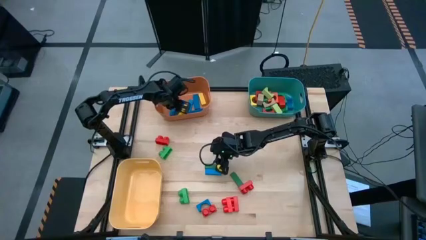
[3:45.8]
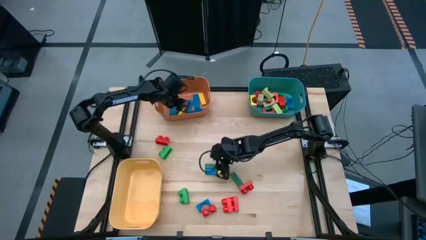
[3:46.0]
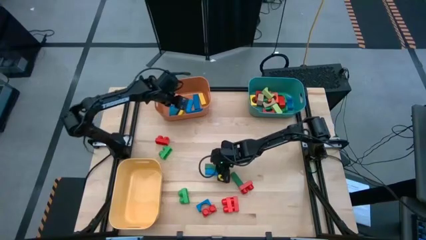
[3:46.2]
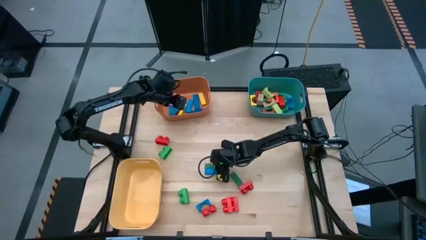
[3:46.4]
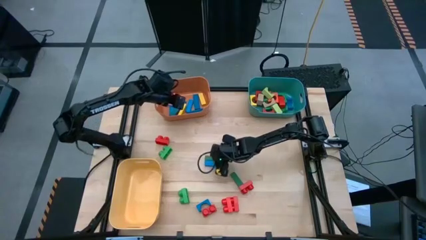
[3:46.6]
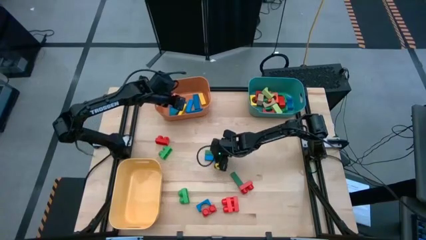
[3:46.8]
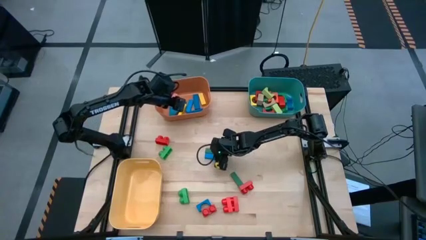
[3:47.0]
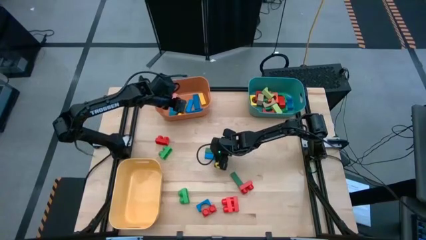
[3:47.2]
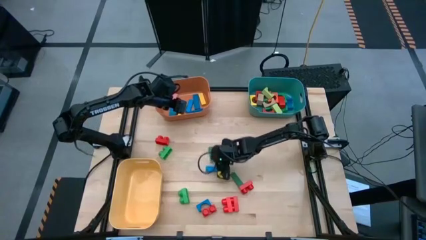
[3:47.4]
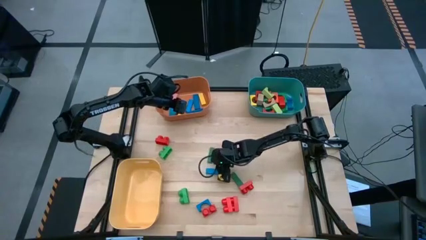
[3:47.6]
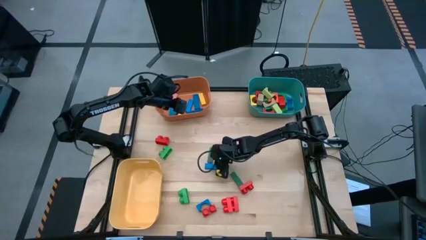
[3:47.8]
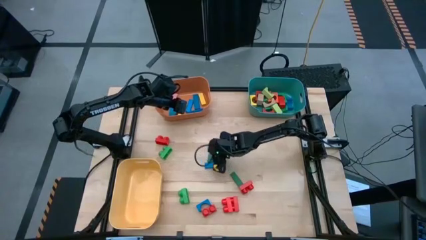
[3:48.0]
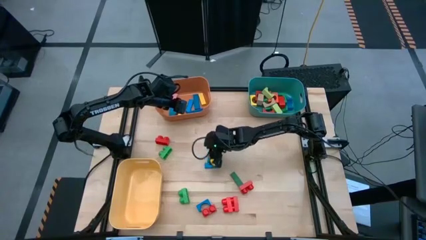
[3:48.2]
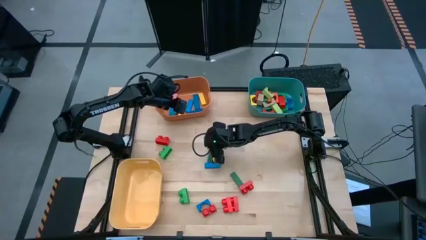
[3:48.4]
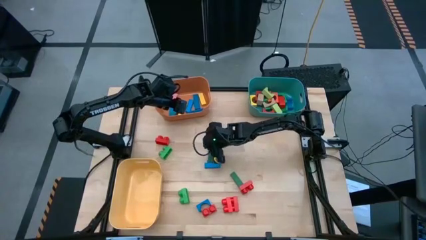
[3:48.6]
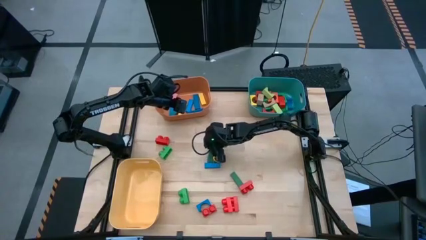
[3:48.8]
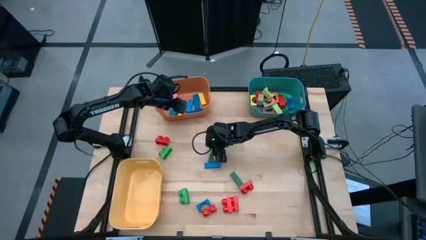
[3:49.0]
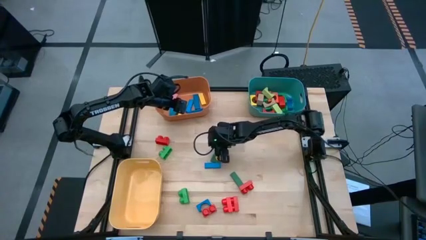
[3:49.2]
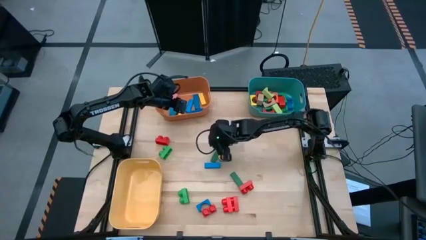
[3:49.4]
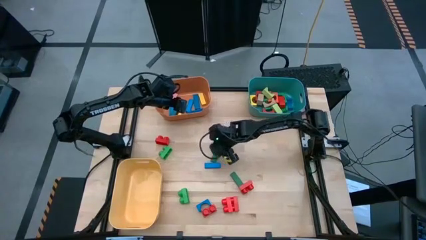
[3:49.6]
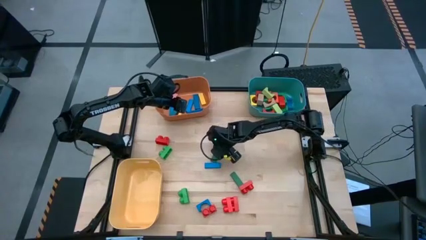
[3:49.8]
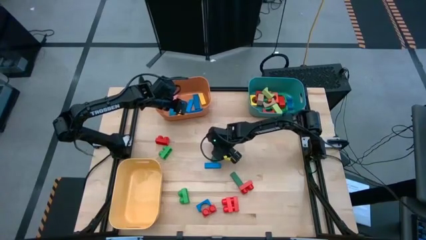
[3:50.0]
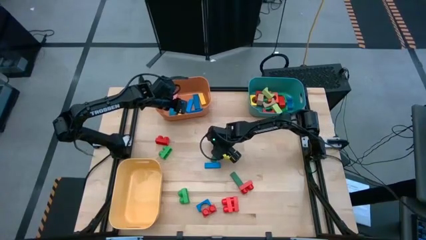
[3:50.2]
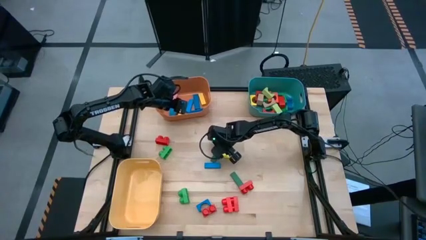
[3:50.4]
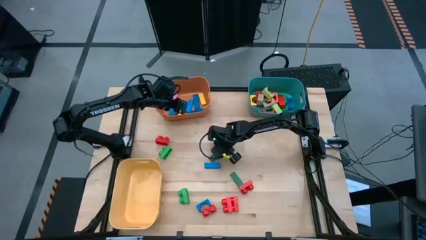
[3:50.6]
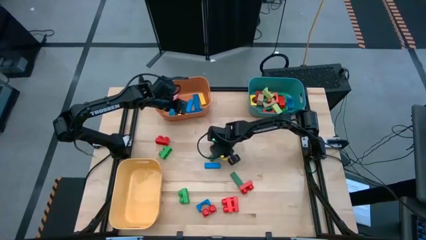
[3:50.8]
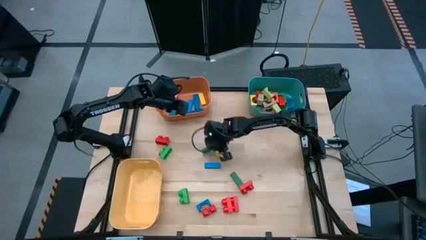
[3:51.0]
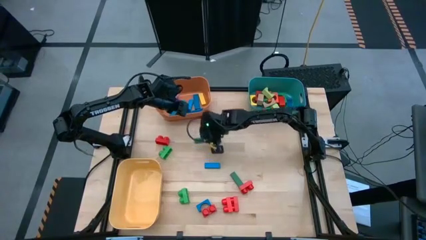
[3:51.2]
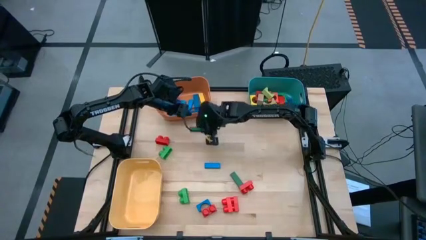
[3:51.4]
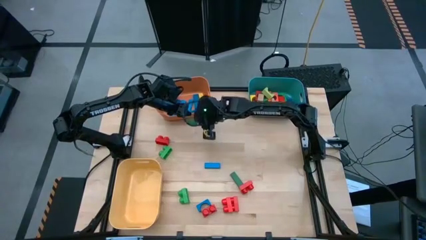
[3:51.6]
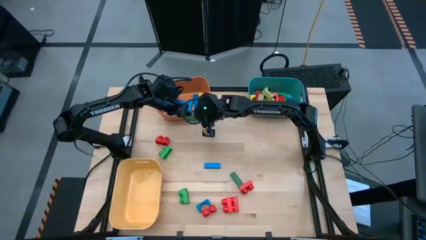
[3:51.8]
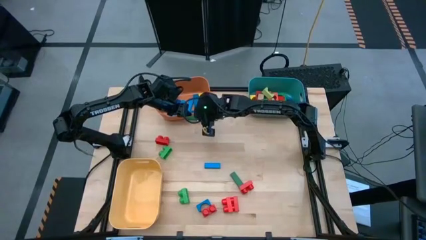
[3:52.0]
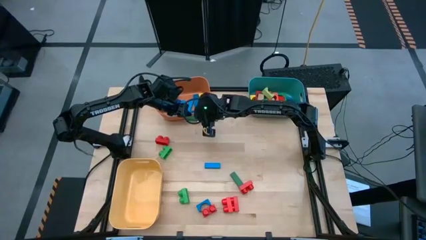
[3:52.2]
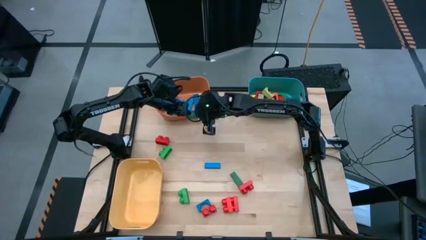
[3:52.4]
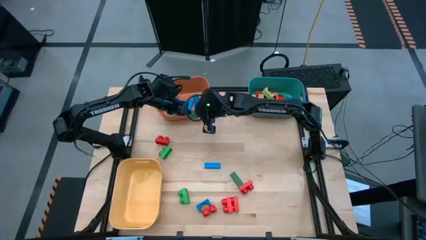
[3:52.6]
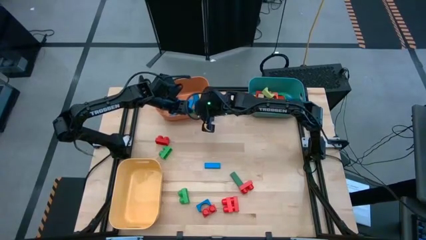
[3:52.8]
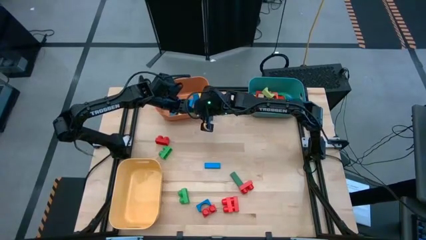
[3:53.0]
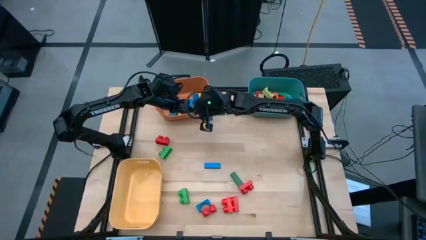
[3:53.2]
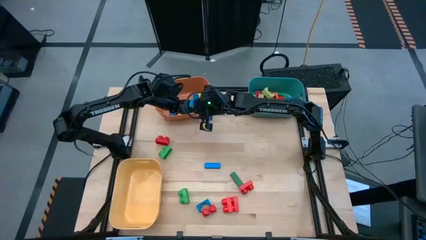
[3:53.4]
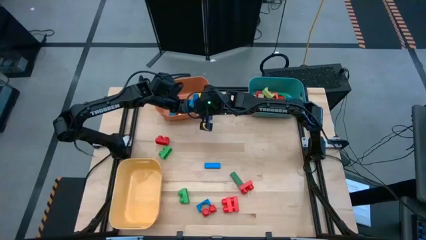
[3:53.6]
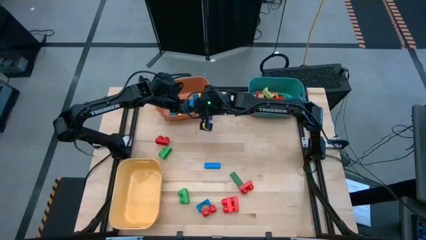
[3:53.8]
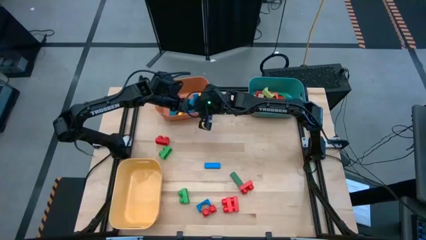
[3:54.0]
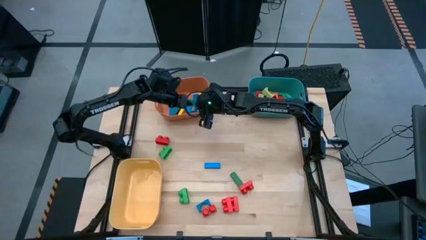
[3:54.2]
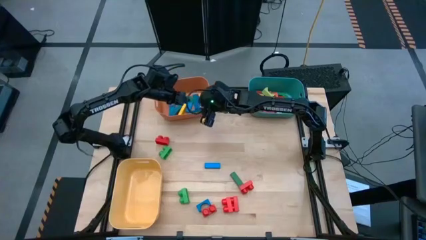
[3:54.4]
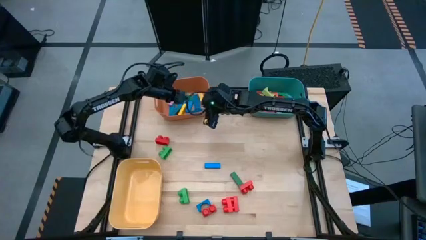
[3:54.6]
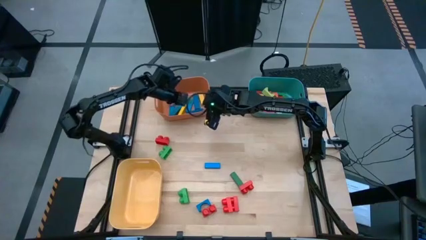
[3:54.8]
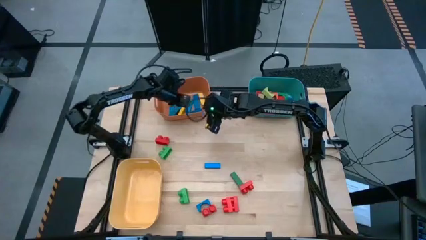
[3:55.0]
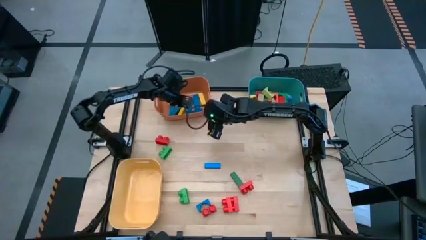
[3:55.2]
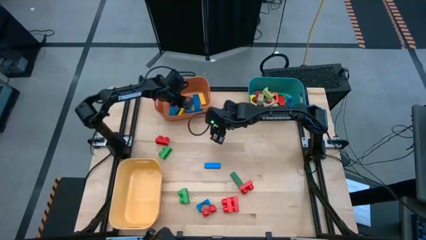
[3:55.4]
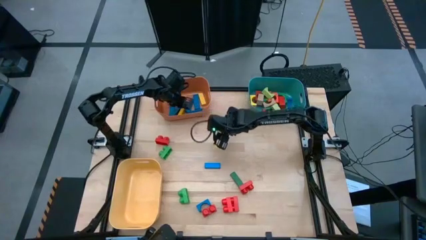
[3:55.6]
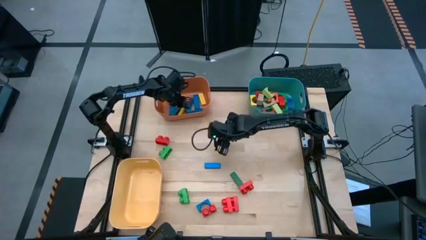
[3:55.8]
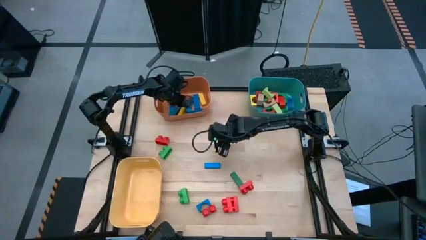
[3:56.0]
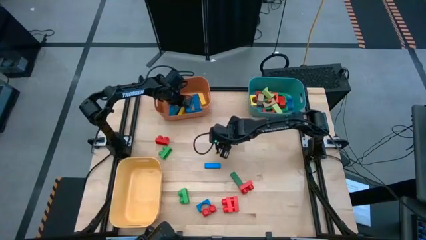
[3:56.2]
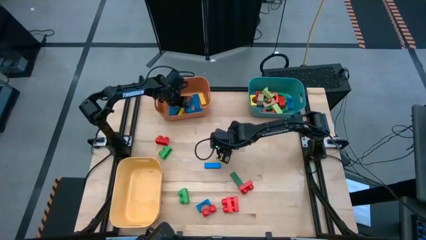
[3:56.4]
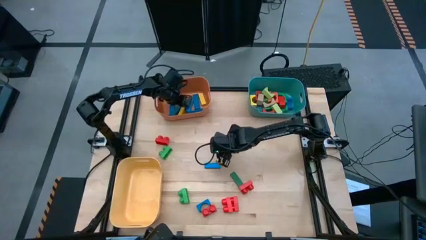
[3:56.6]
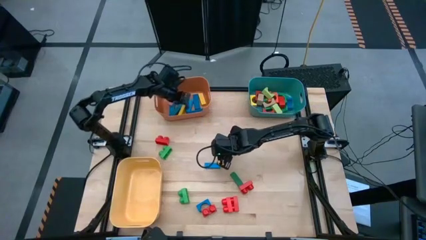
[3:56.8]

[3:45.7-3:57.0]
Task: Sort blocks by size
Put the green rectangular block into the orange bin

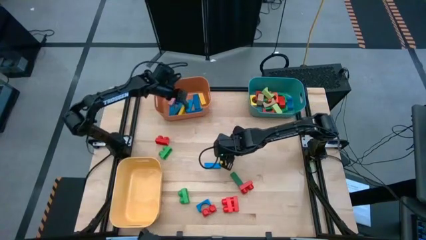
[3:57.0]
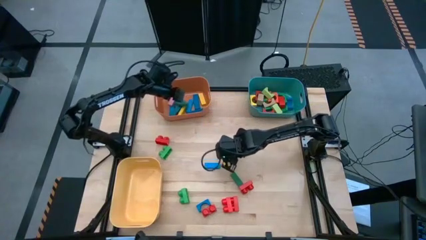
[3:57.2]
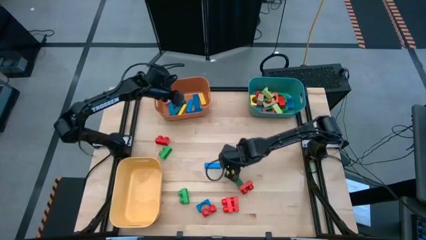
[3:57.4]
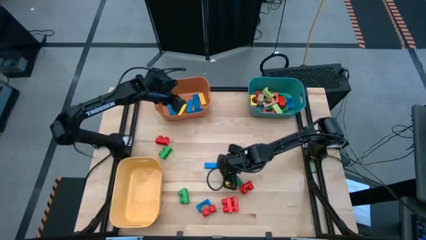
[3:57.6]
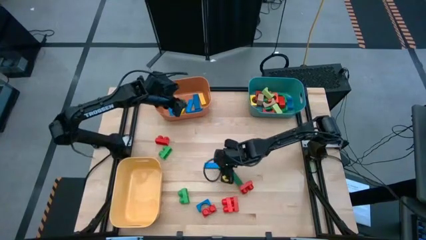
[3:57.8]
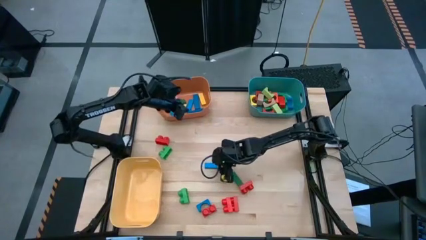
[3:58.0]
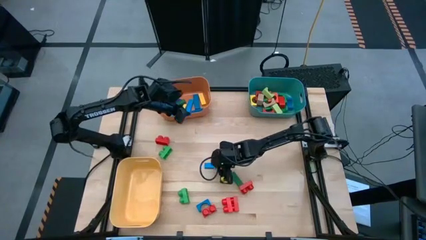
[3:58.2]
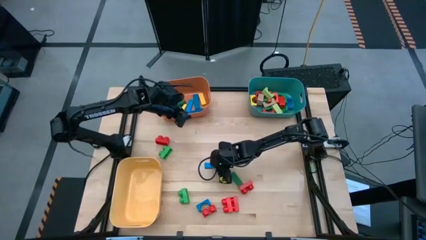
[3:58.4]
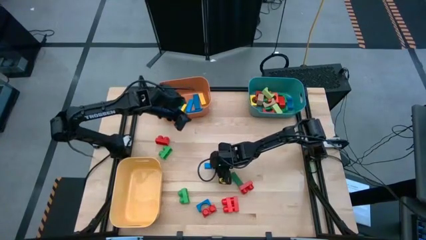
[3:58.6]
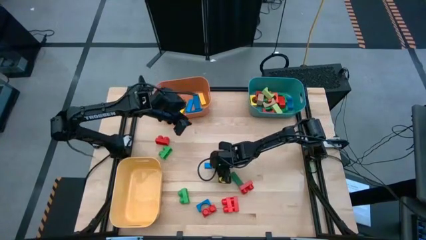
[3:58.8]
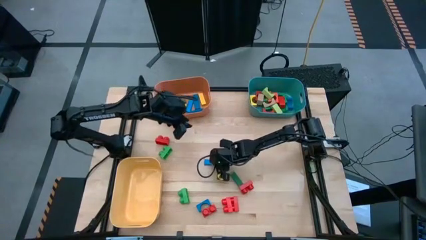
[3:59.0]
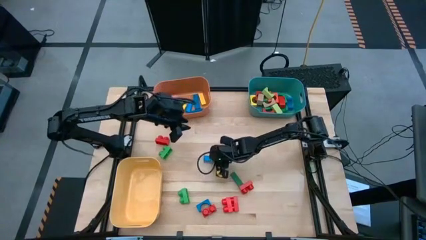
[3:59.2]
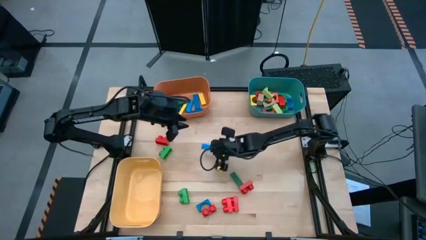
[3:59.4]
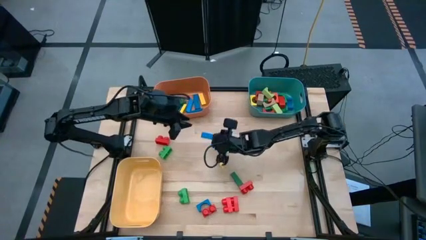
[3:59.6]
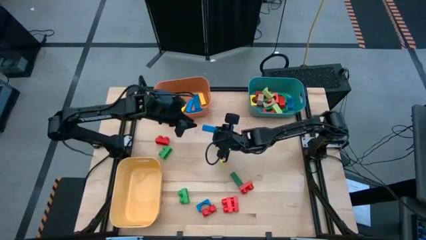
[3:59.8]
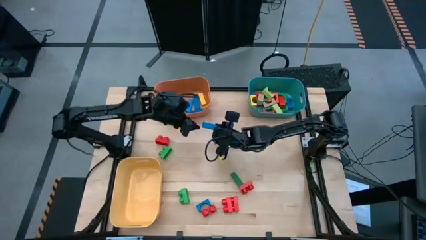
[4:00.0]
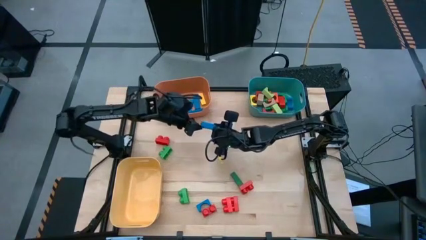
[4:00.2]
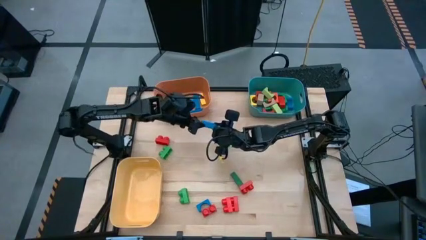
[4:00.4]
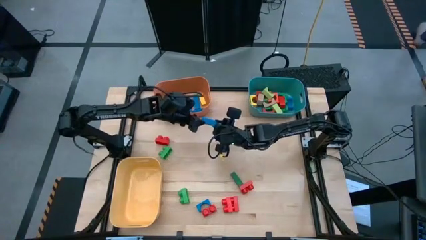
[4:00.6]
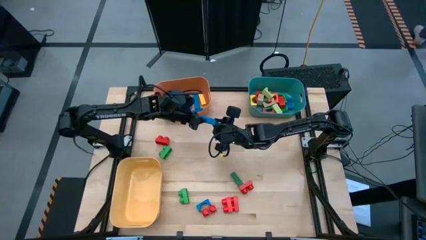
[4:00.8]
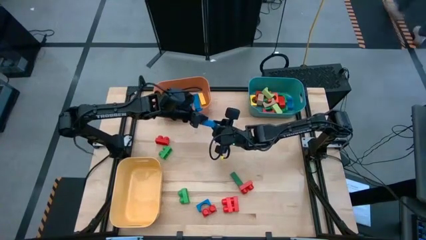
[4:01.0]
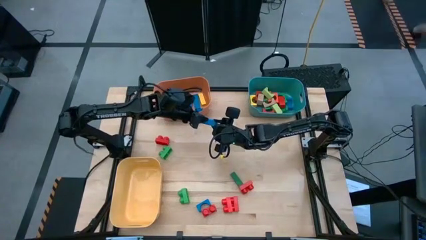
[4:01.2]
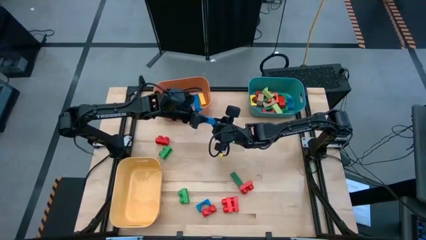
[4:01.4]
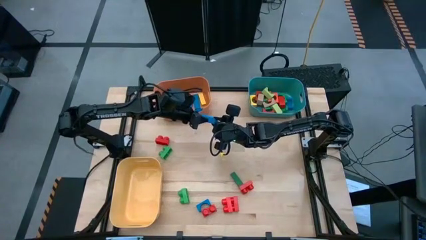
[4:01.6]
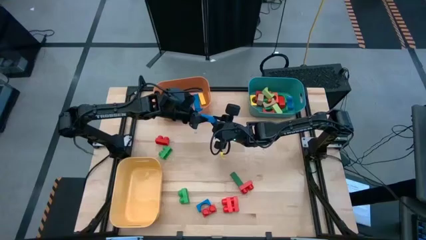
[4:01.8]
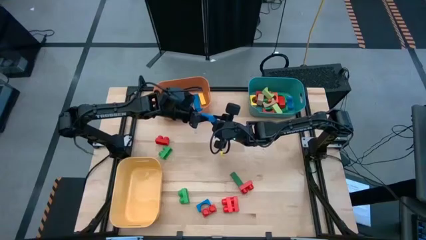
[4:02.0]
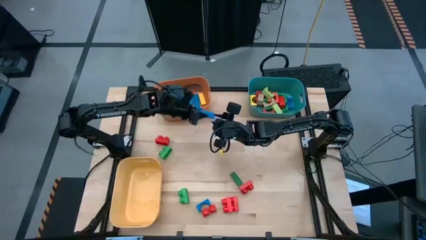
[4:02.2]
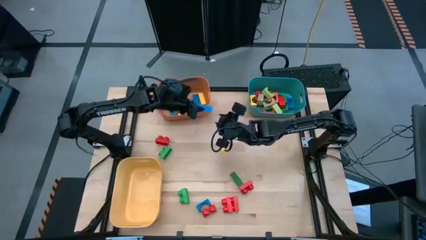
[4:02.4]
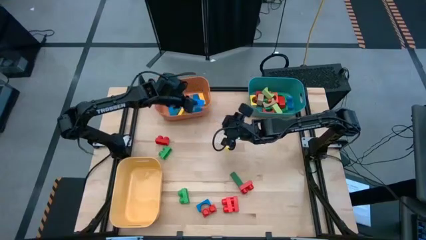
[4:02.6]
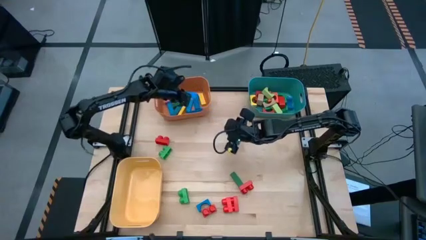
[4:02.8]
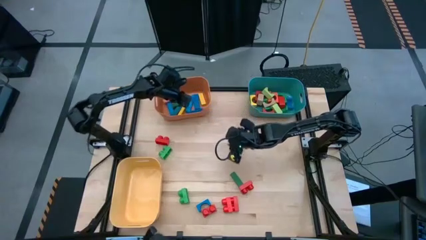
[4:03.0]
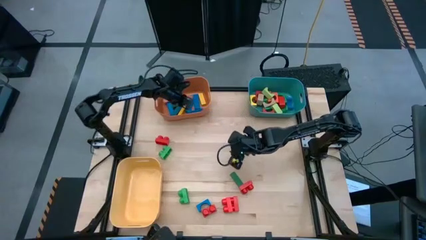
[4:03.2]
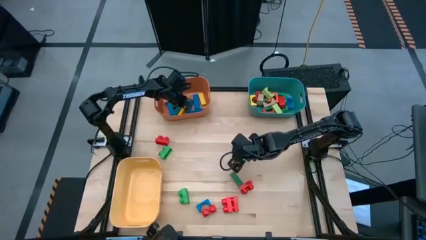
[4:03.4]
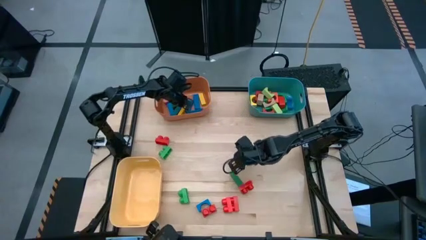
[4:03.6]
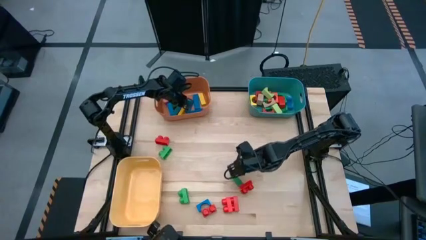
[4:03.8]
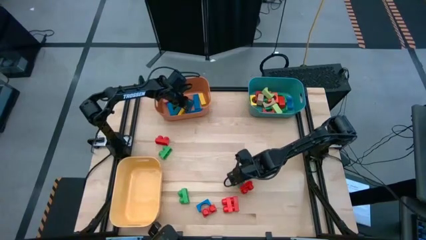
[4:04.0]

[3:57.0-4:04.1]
Put the blue rectangular block into the orange bin
